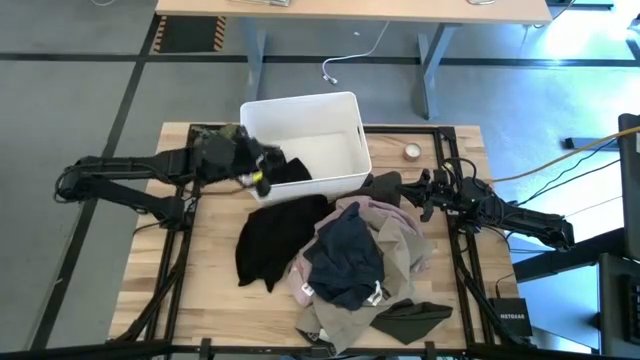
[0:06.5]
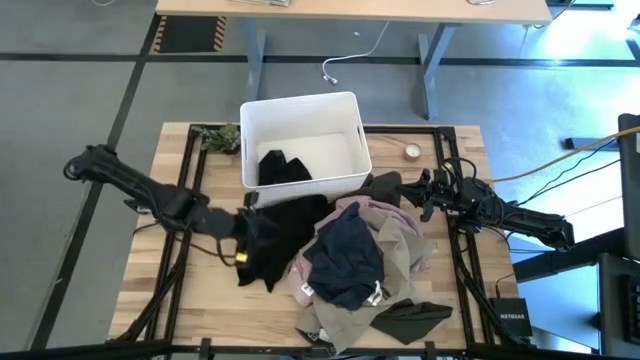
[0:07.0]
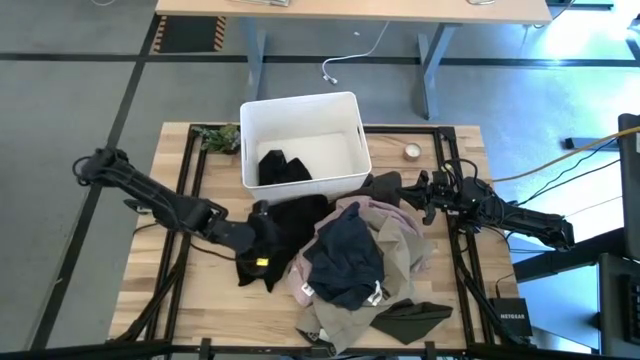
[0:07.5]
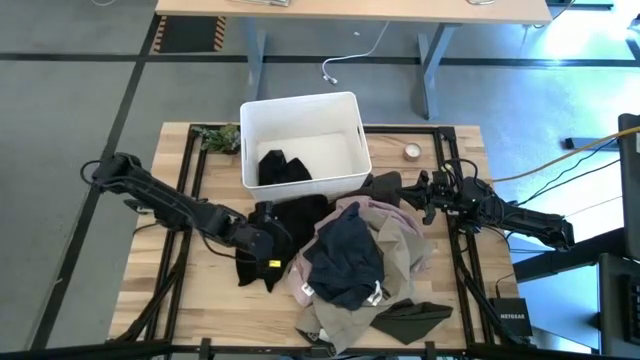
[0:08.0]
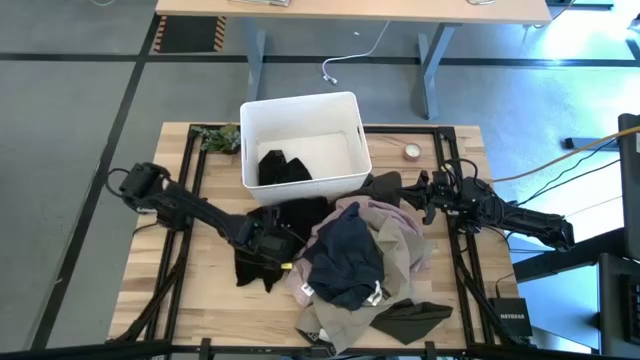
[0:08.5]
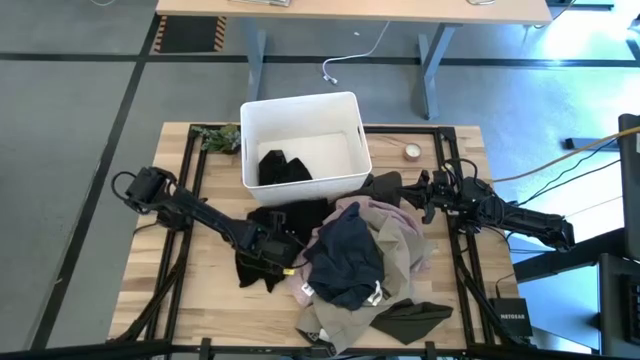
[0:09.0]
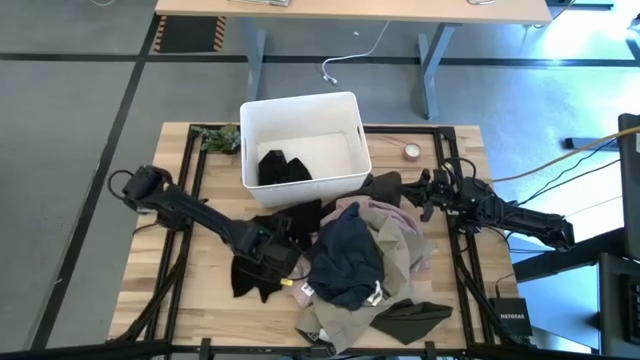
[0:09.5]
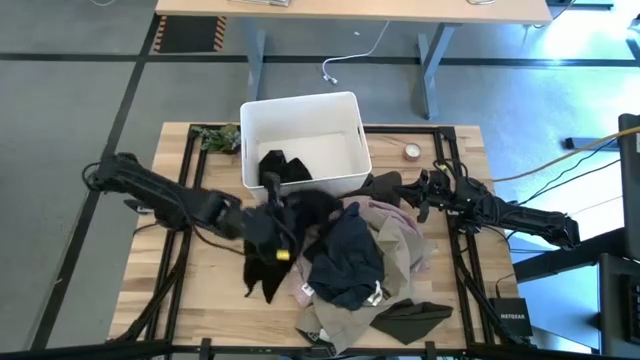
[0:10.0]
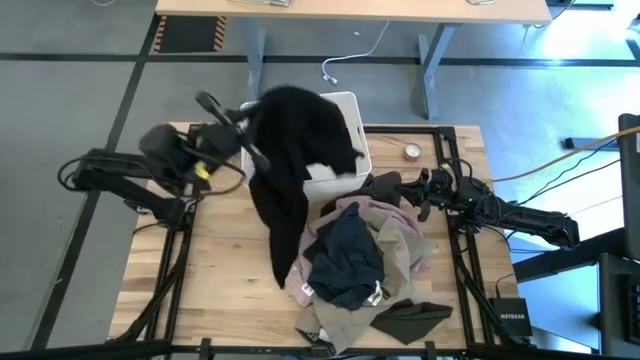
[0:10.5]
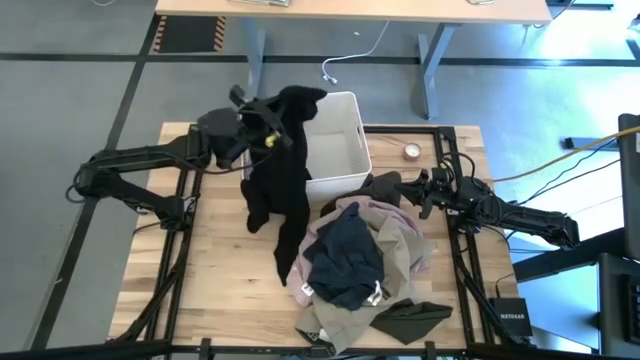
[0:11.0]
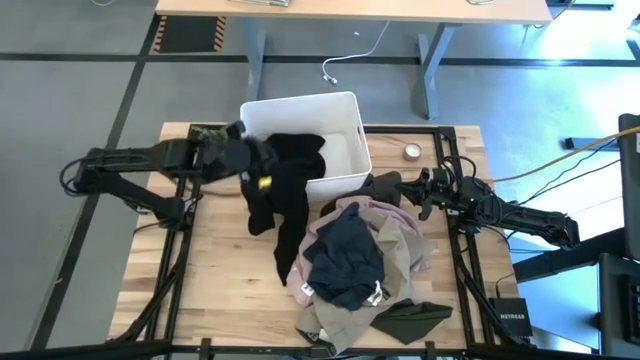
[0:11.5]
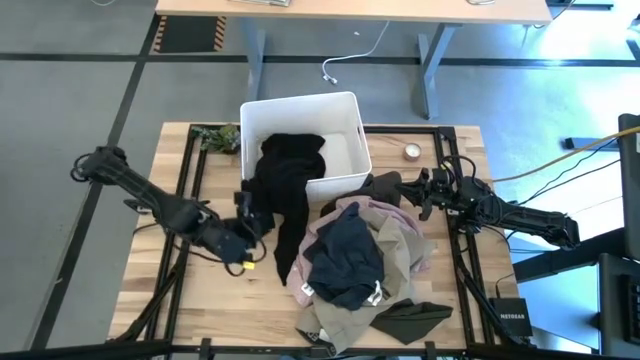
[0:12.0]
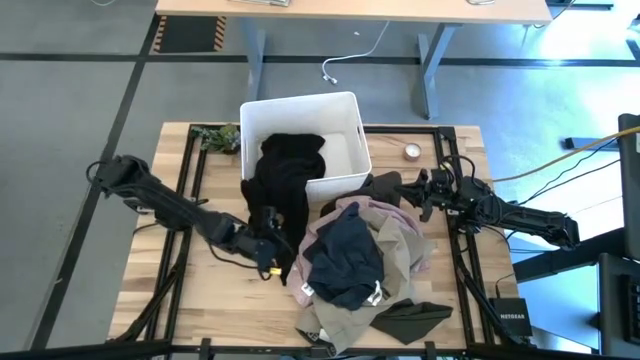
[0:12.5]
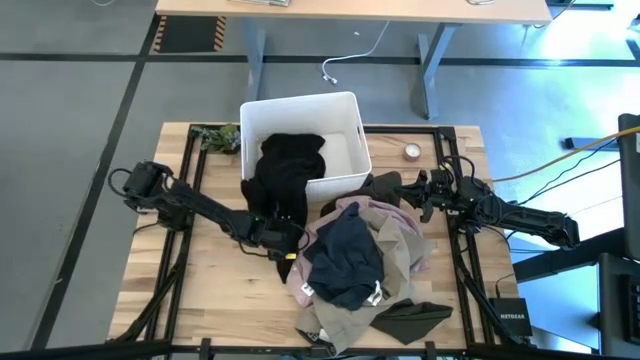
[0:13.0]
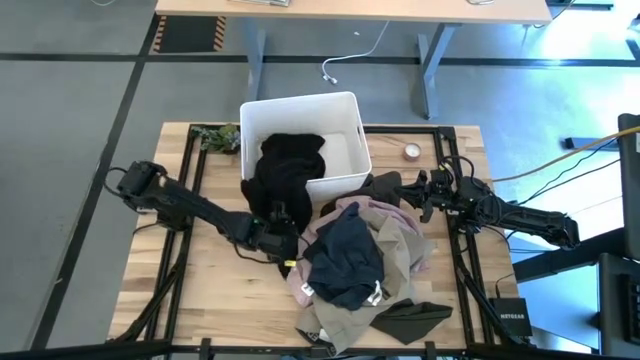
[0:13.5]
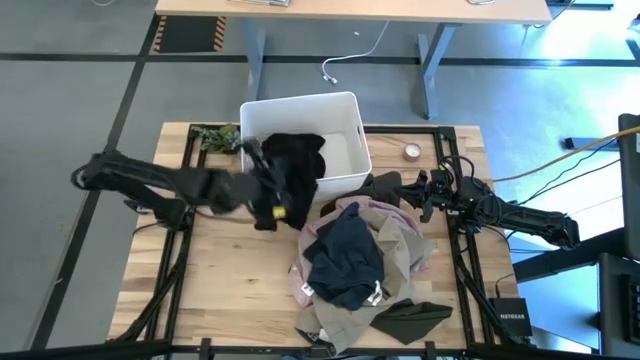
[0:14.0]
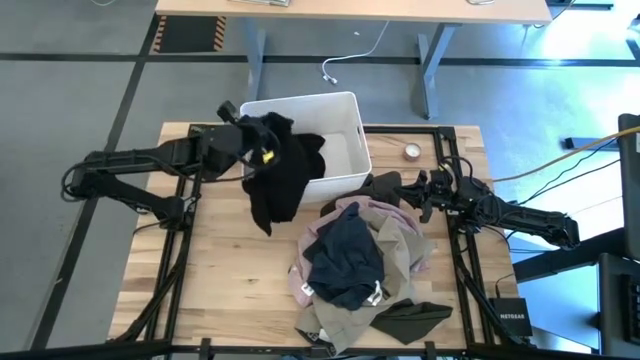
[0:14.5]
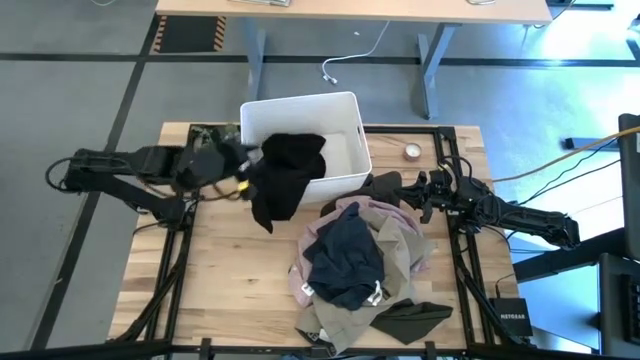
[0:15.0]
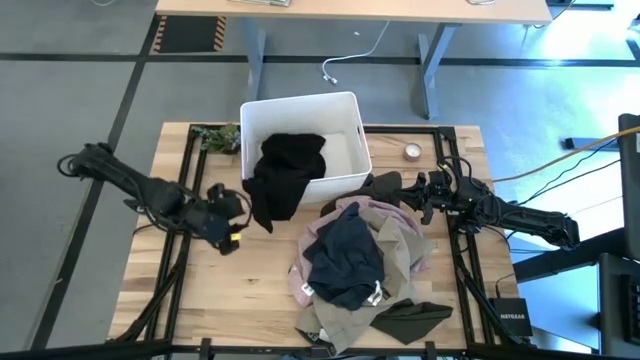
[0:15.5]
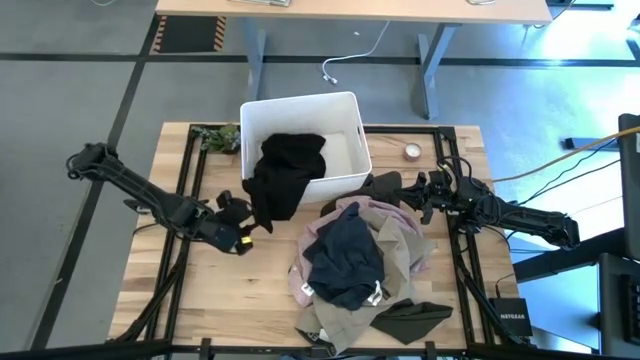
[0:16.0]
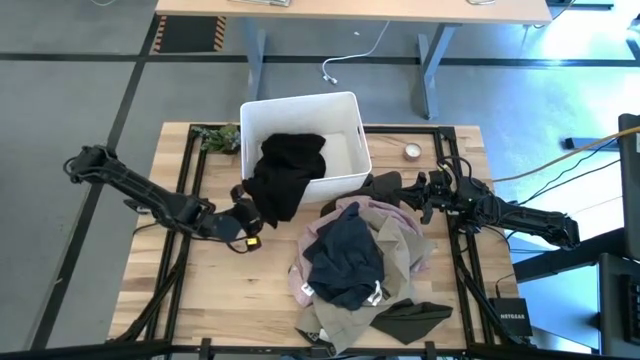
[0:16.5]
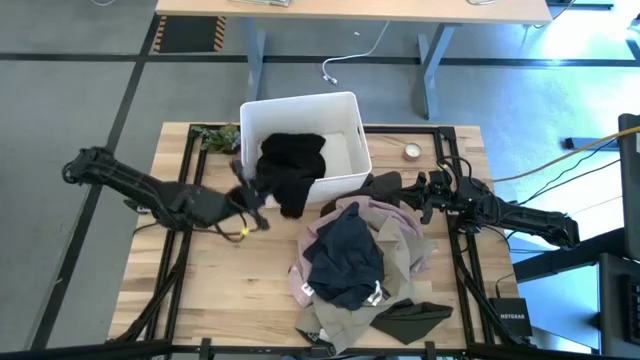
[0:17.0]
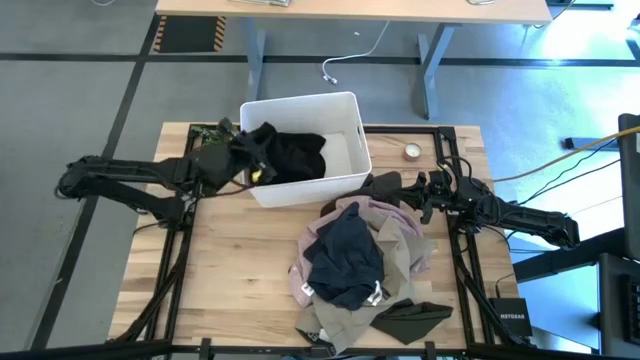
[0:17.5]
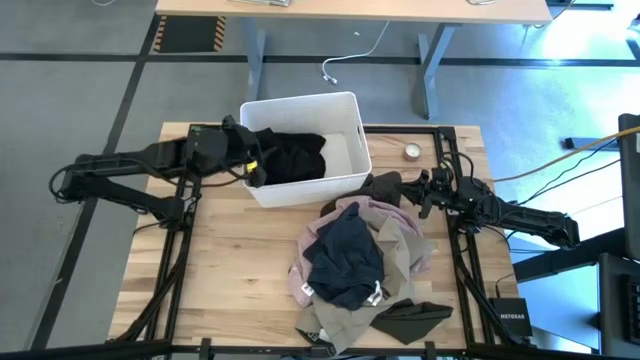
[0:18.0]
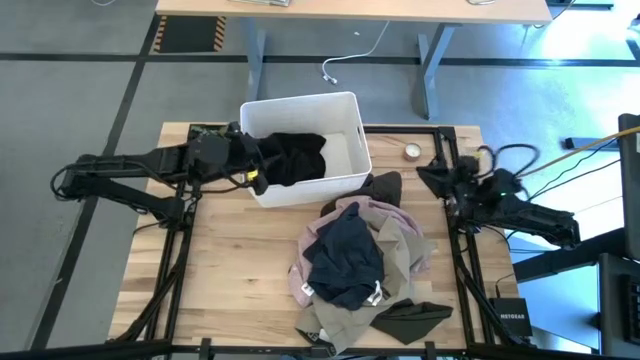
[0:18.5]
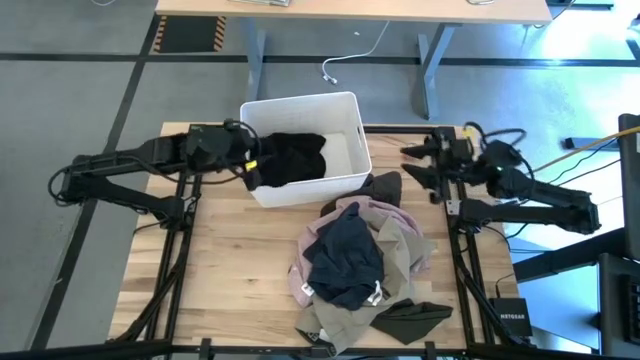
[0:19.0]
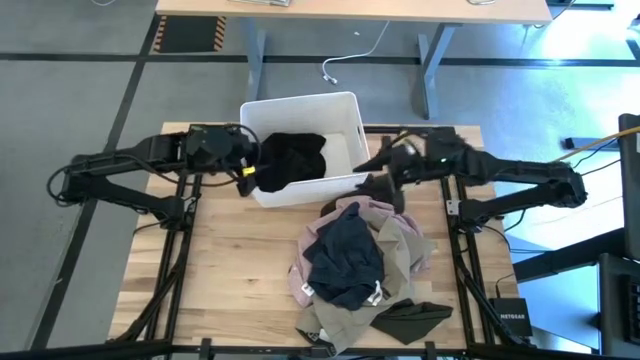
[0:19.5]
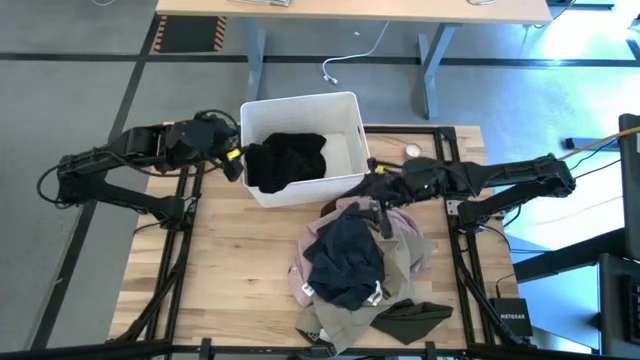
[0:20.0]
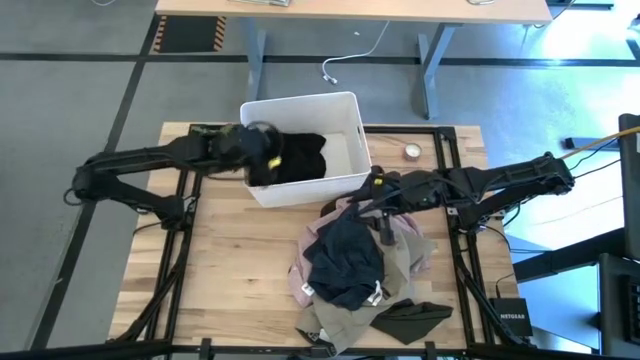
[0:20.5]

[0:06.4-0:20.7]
Task: Sort clothes
Put the black jacket into the white laundry bin

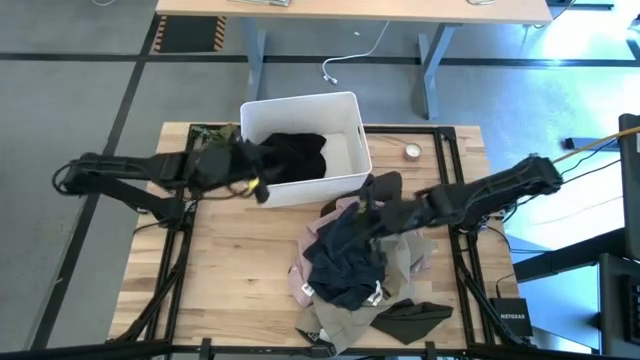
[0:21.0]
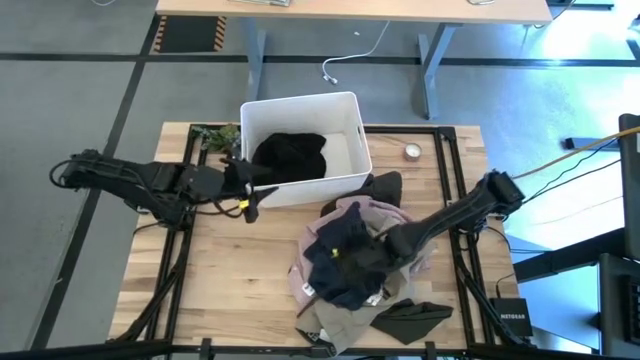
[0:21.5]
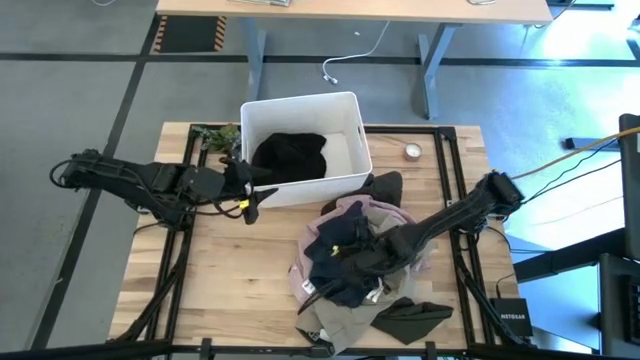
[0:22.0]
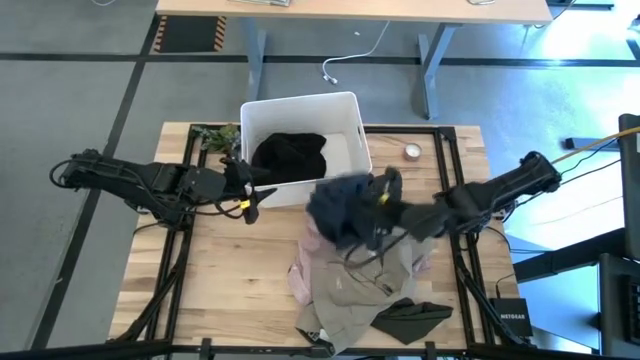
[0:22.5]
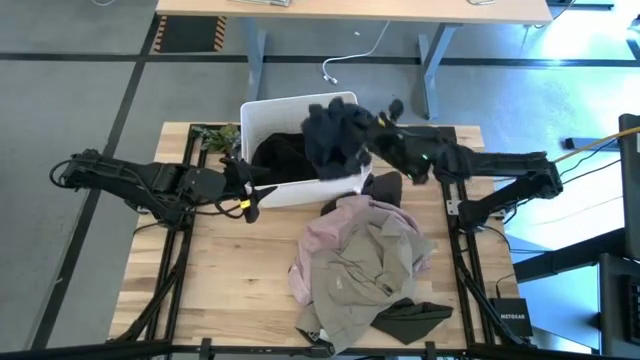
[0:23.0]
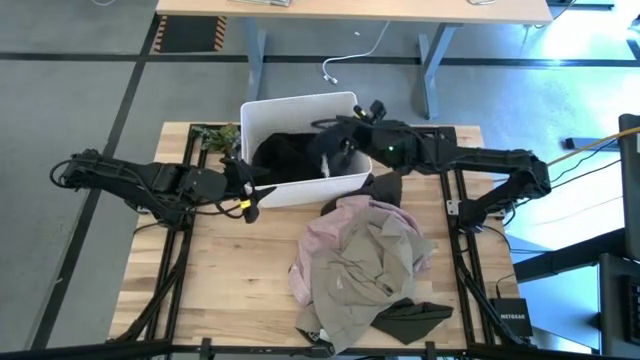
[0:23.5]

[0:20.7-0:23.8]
Put the blue shorts into the white laundry bin

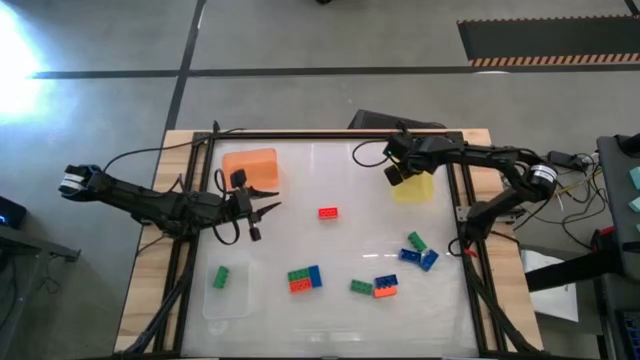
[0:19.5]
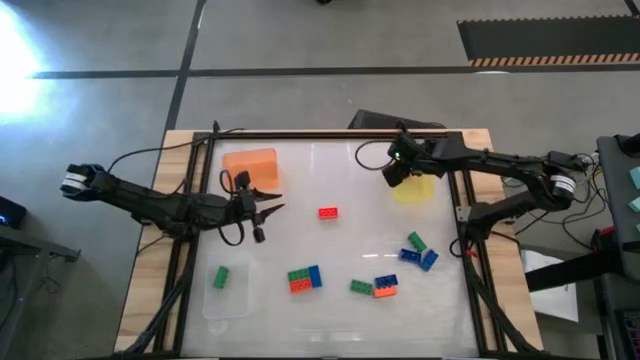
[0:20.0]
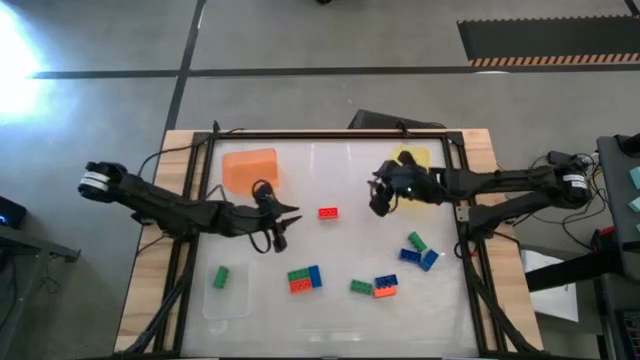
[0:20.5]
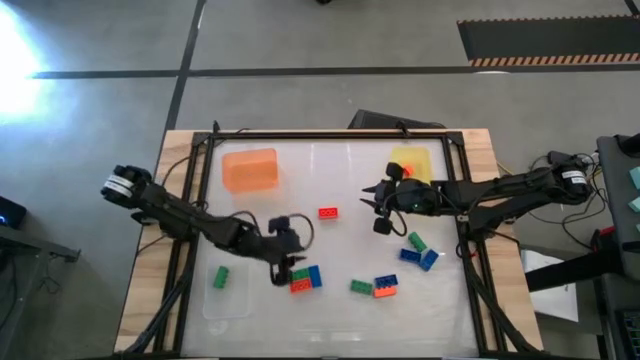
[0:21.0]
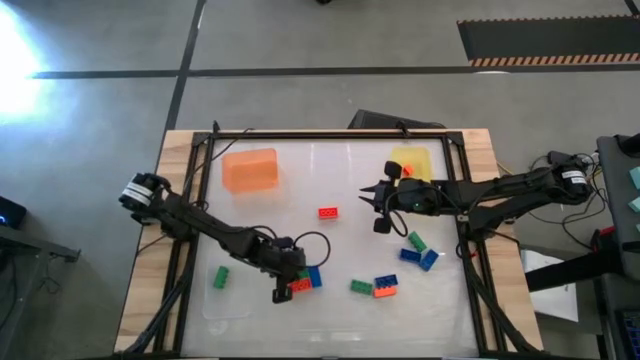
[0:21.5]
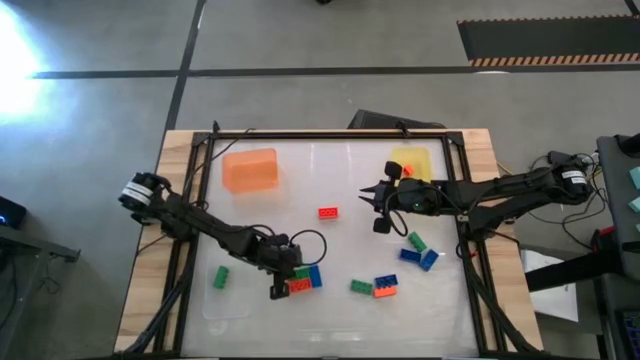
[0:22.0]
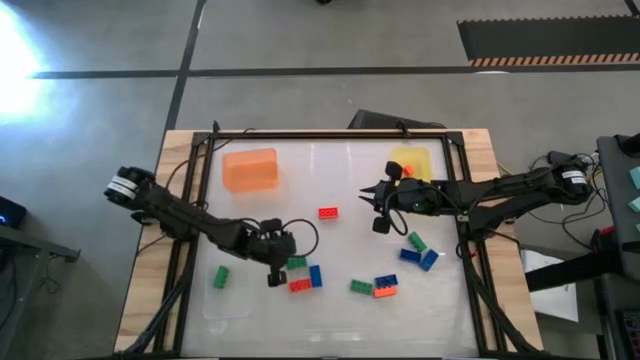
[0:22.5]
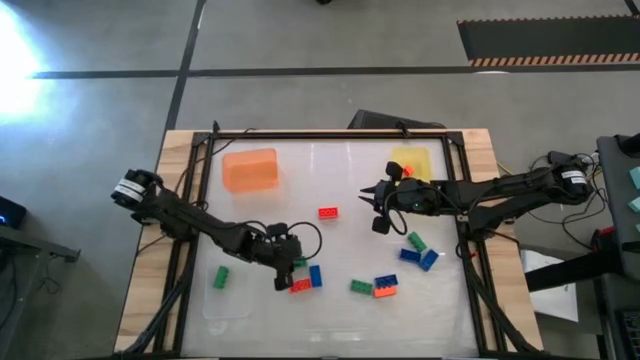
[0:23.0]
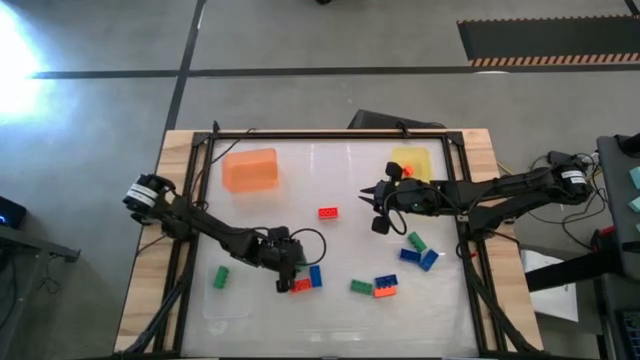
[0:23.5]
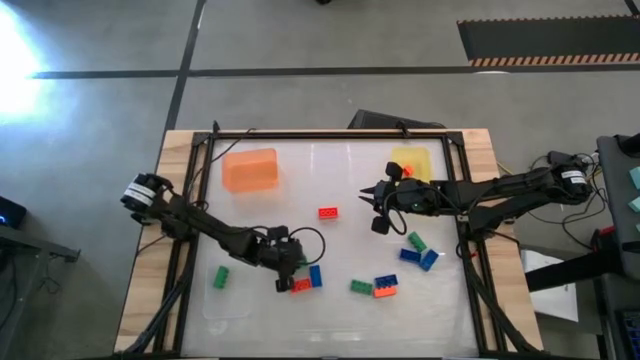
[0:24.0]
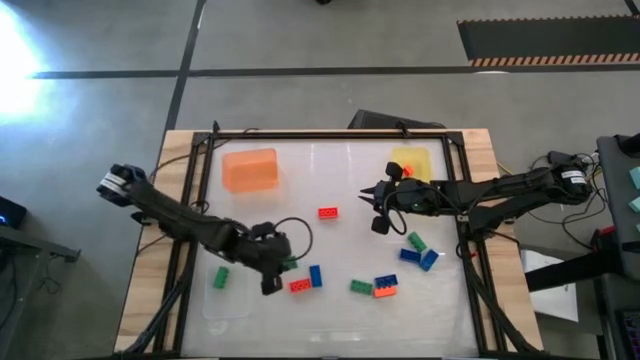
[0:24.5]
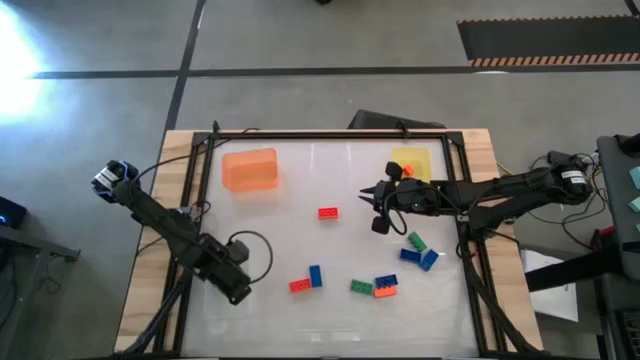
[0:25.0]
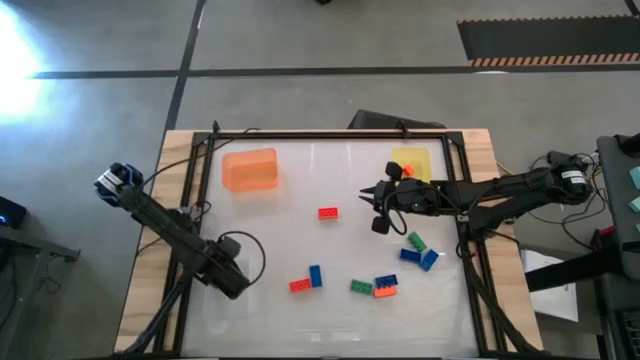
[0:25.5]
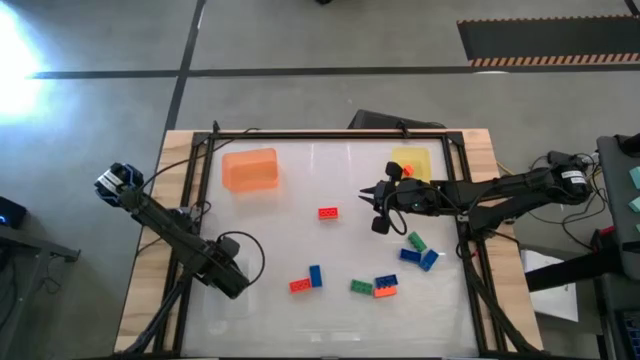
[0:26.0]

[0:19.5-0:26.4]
Task: Sort & place blocks by color
Put the green game piece into the transparent bin
